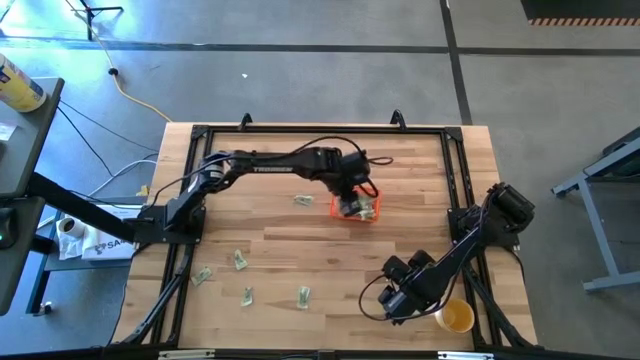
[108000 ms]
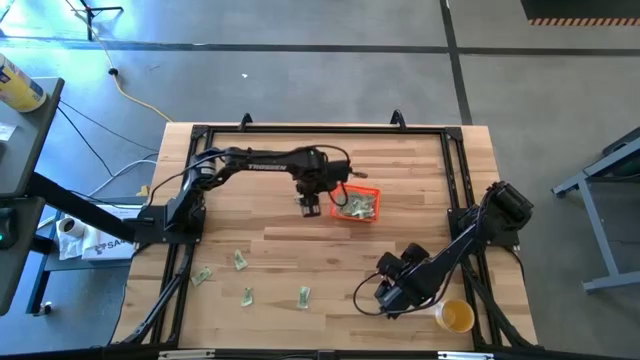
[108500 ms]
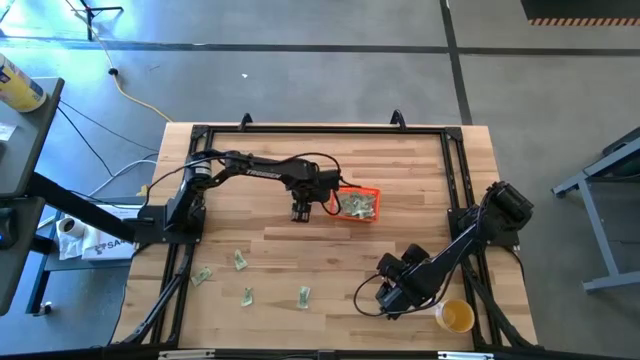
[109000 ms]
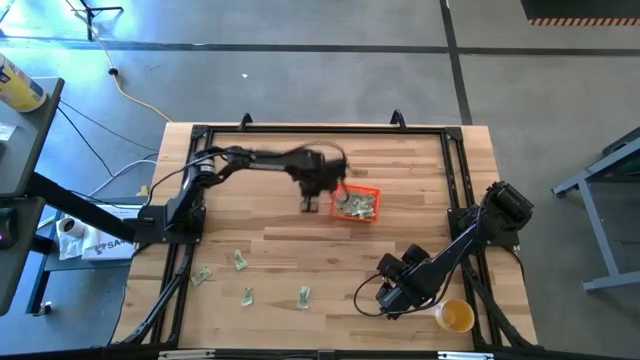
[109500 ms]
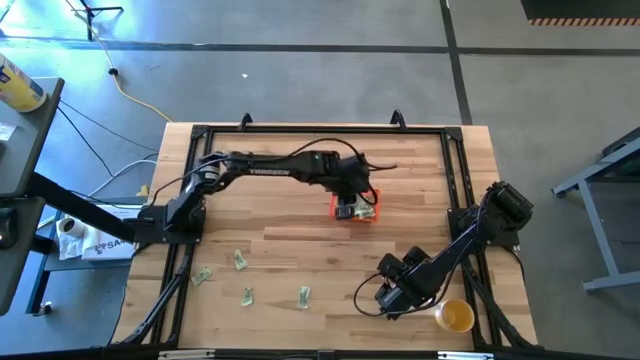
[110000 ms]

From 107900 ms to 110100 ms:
Task: Pick and place Stevia / Truvia into bins
Put the green stevia packet into the orange basket

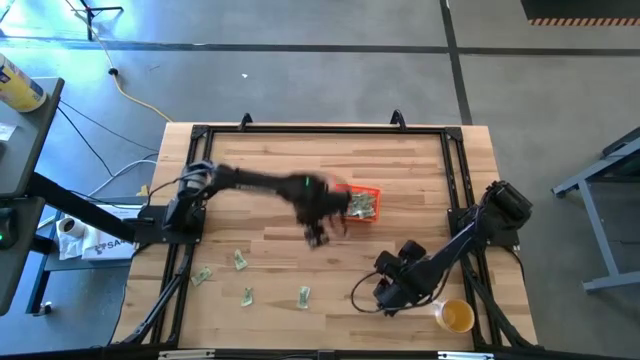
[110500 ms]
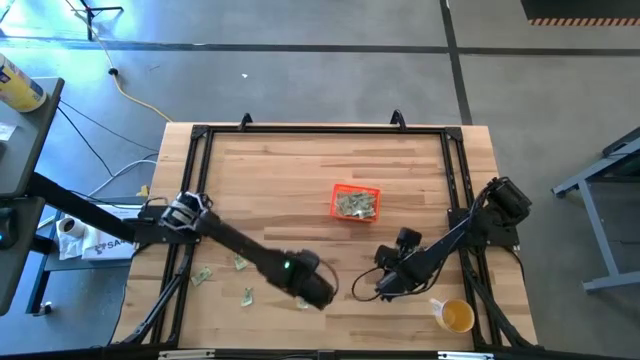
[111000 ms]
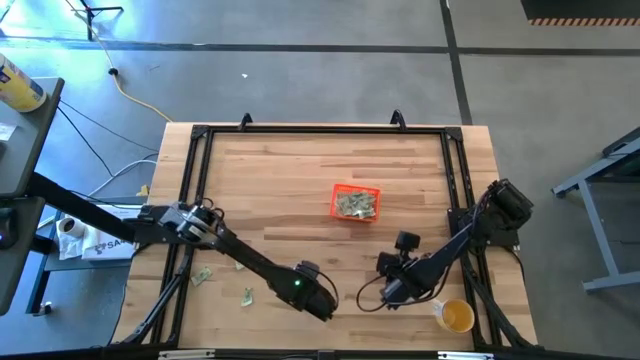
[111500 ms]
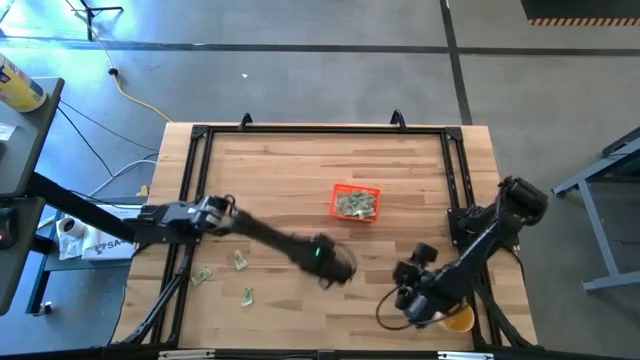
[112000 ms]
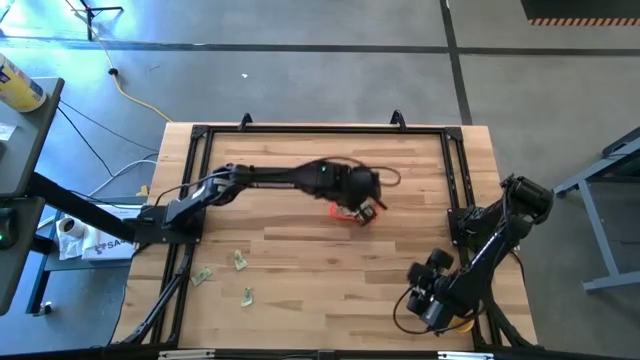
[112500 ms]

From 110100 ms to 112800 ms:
Put the green stevia packet into the orange basket

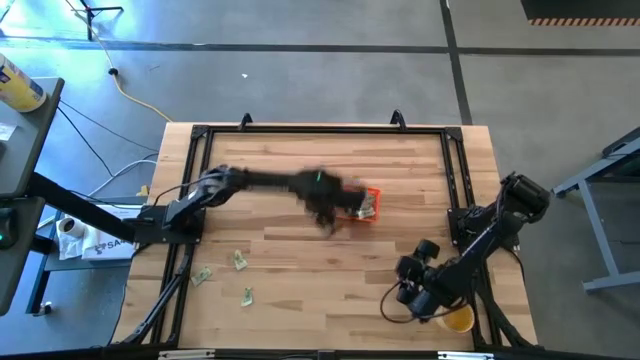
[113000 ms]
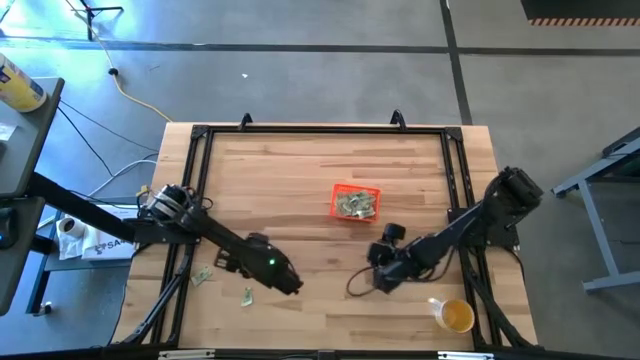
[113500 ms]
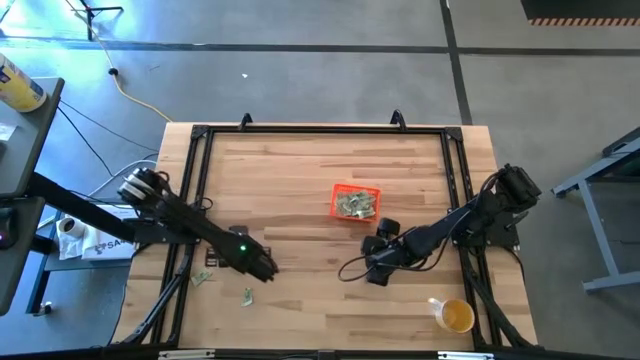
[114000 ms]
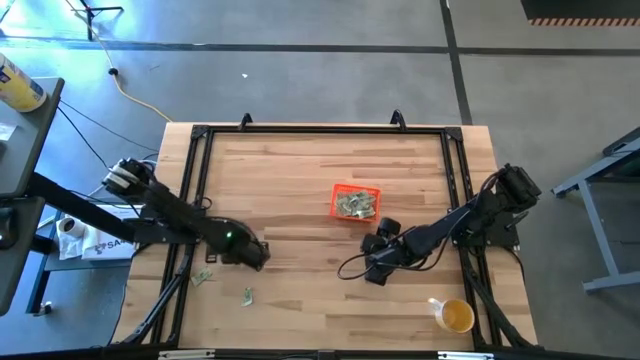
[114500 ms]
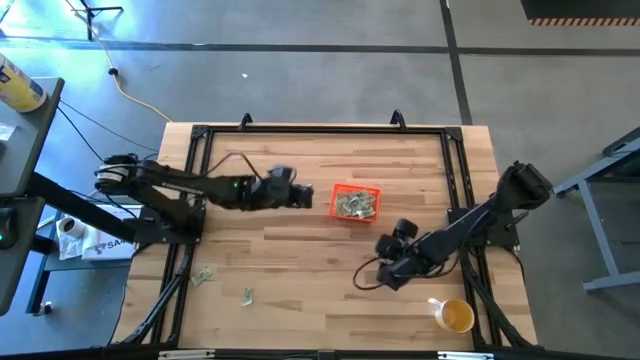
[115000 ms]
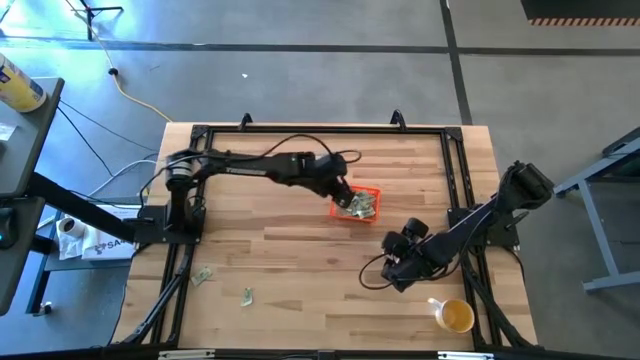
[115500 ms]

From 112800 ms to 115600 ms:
Put the green stevia packet into the orange basket

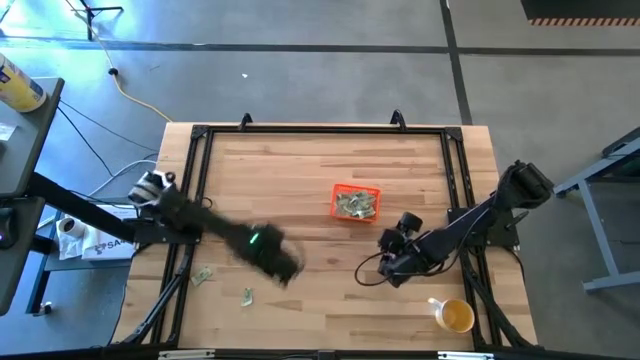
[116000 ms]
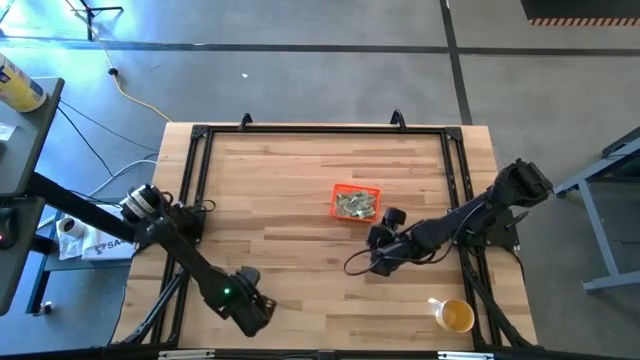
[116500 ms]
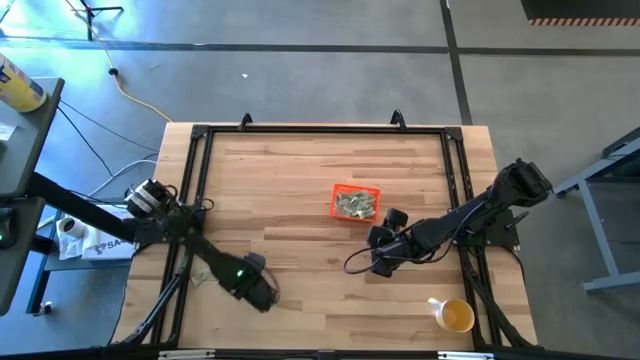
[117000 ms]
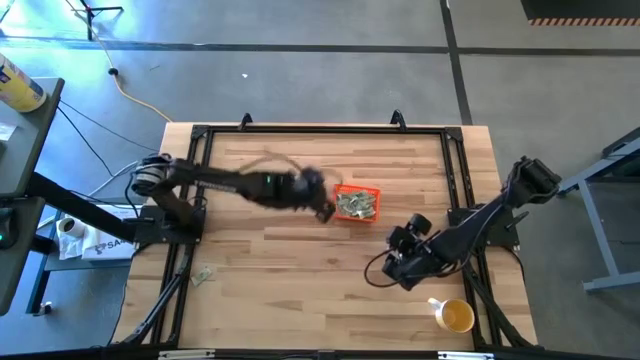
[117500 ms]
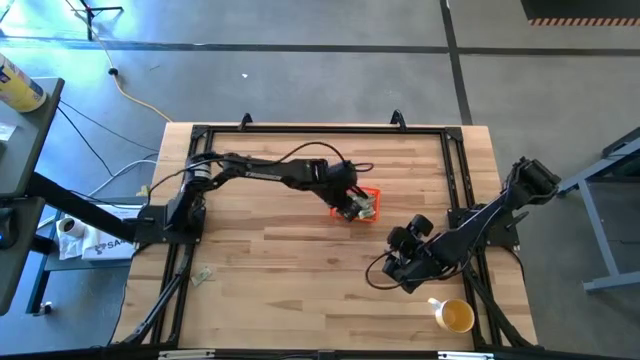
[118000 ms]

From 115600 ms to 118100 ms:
Put the green stevia packet into the orange basket

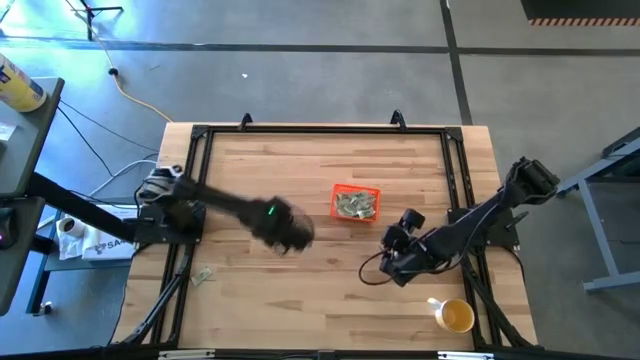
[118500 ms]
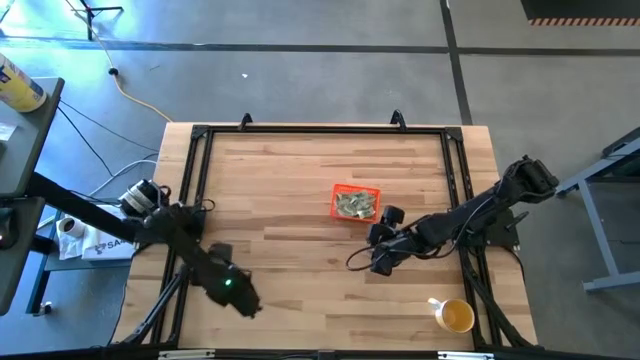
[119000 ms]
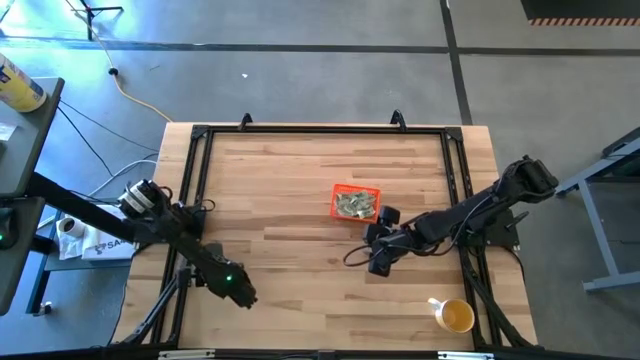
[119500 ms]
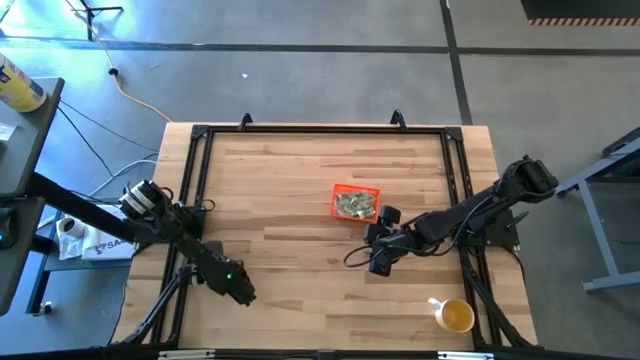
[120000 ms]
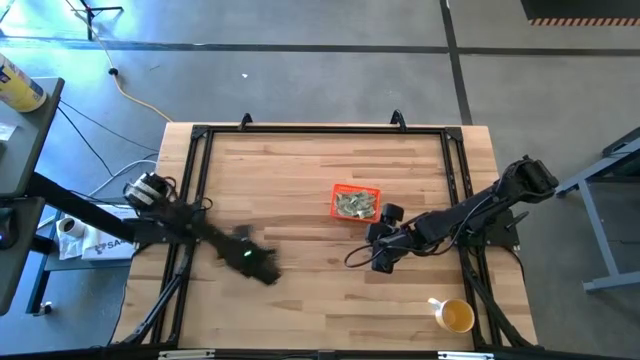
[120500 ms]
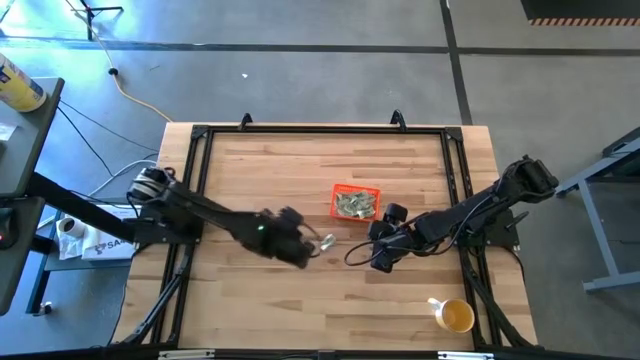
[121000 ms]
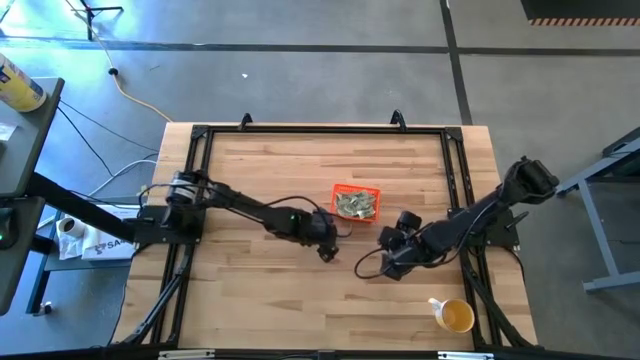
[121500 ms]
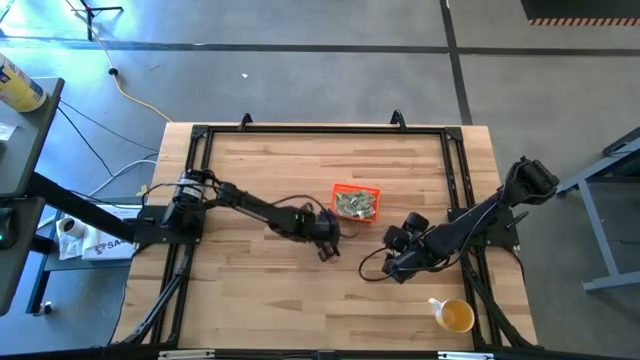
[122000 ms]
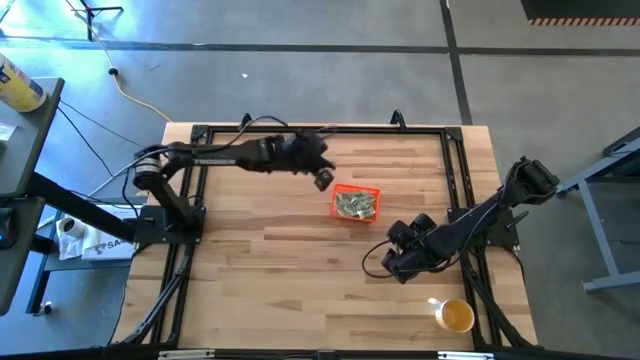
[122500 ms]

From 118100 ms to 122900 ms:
Put the green stevia packet into the orange basket

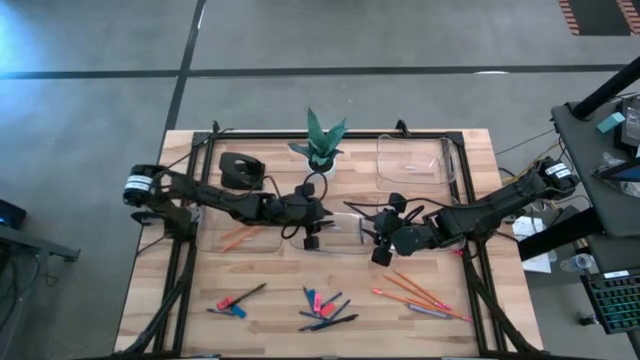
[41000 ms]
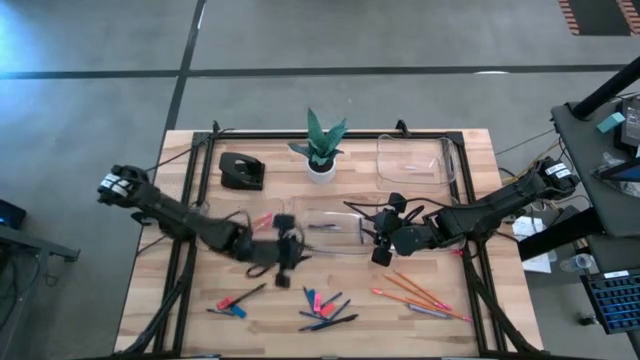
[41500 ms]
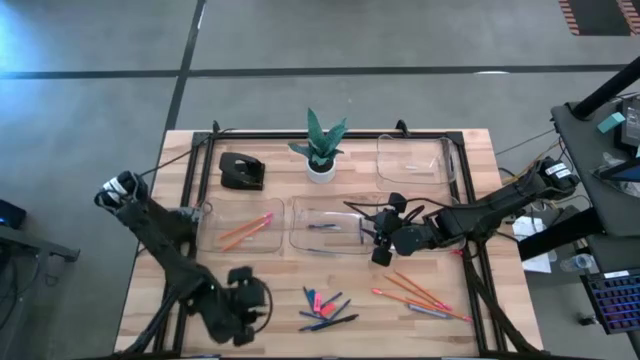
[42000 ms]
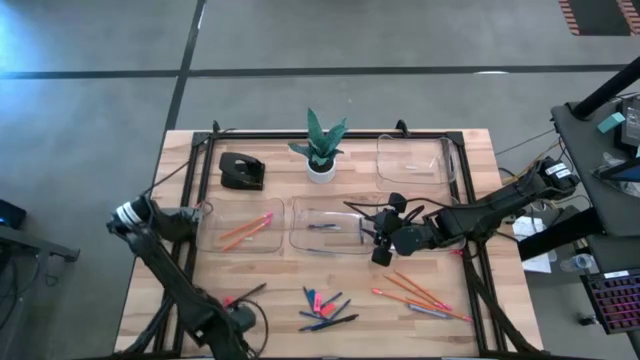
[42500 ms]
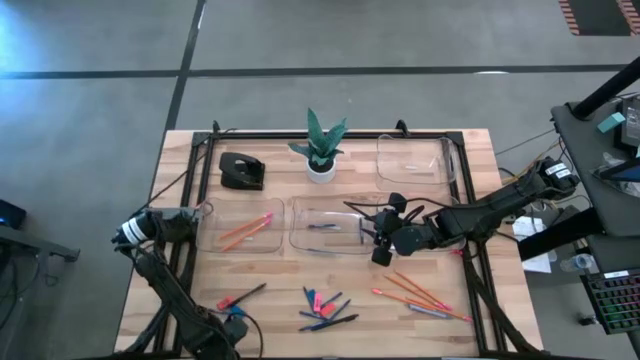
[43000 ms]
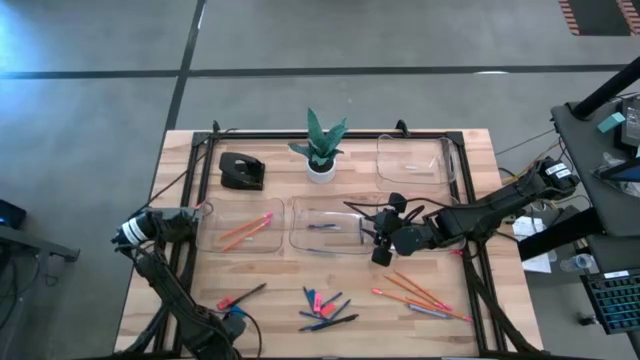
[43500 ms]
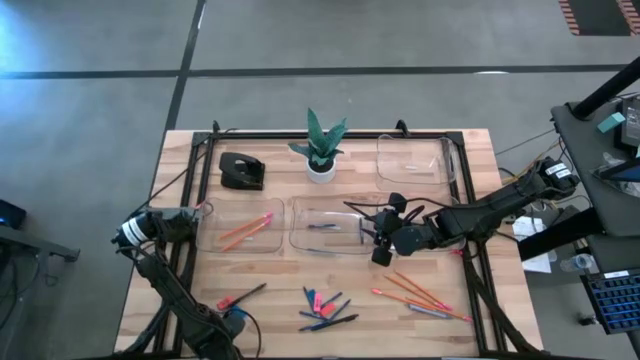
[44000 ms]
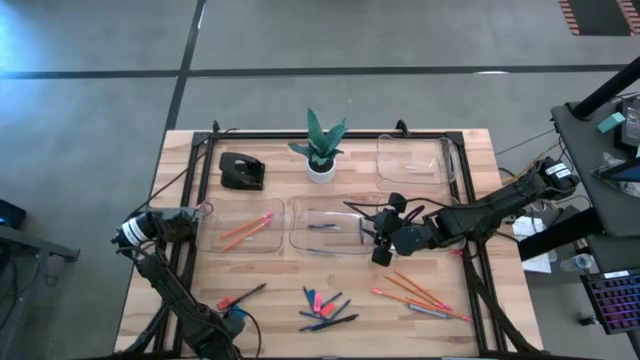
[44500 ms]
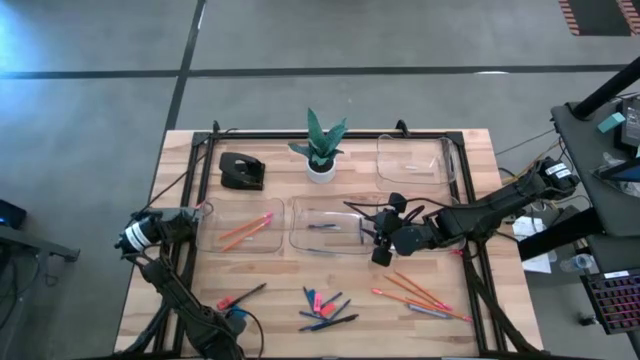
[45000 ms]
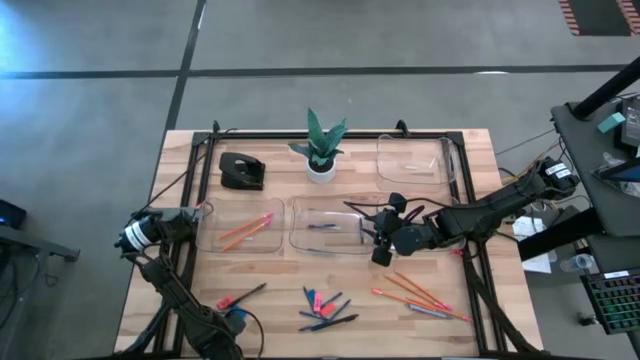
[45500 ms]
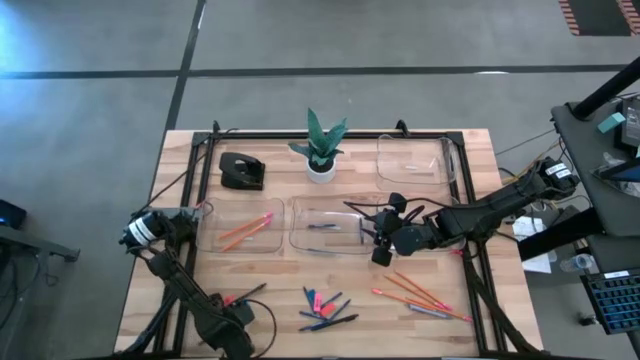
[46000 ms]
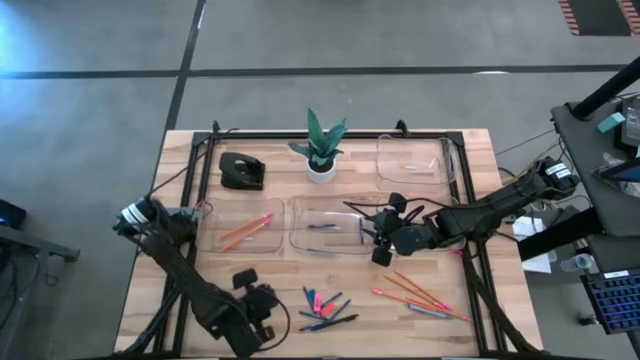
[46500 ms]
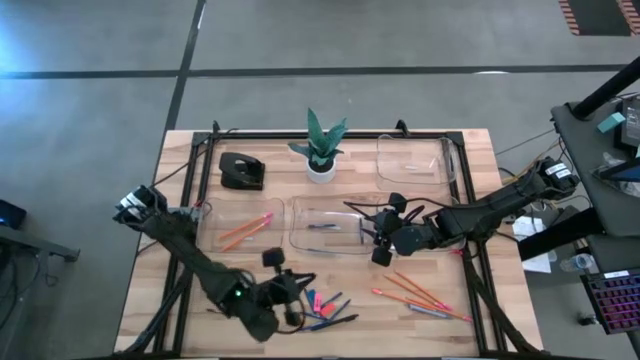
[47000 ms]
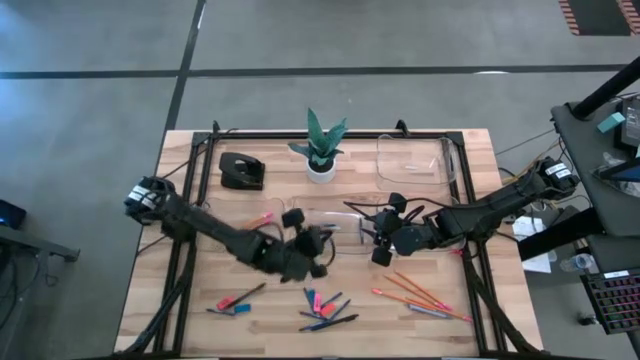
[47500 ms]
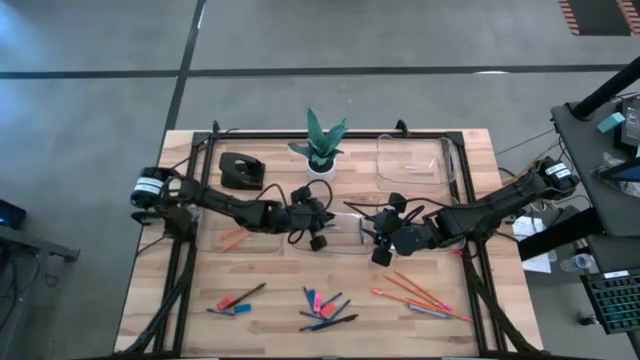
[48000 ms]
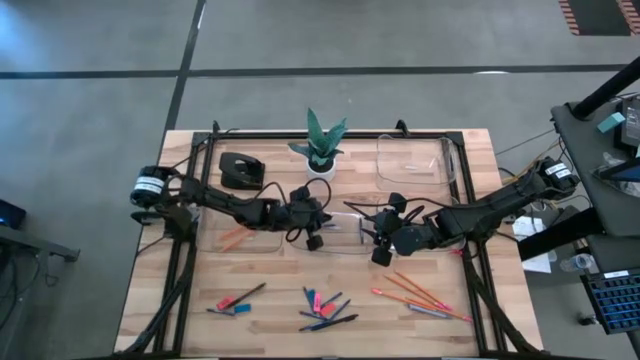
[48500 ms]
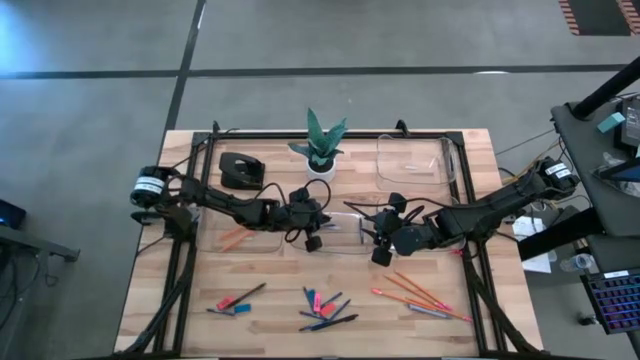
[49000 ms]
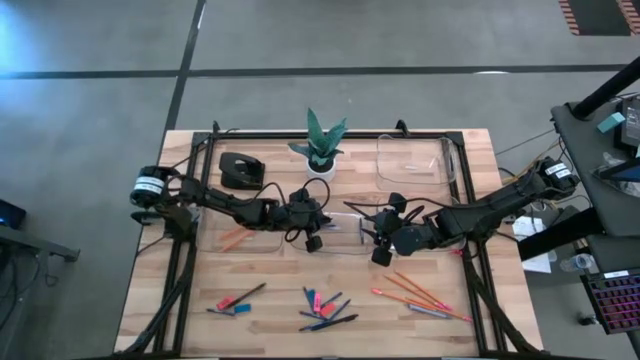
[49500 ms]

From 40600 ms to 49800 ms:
Task: Sort crayons/erasers/pens/pencils in bins
Put the blue crayon into the middle transparent bin
